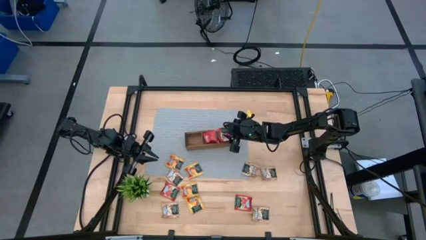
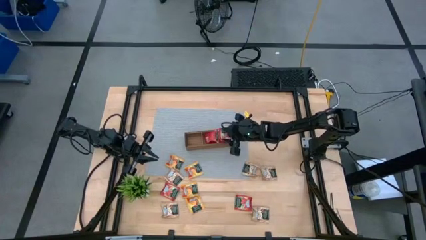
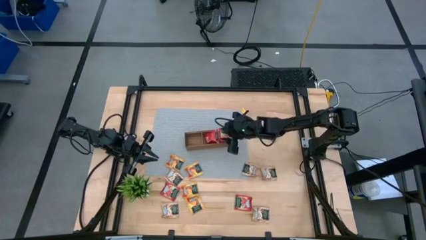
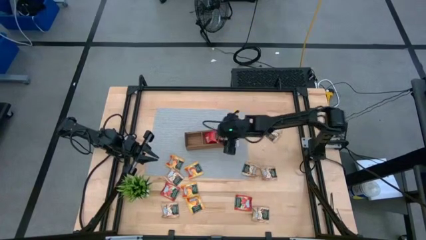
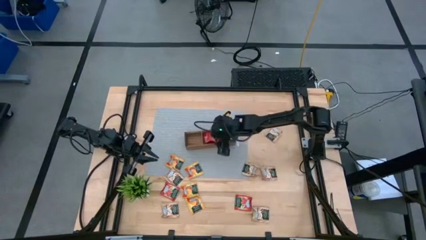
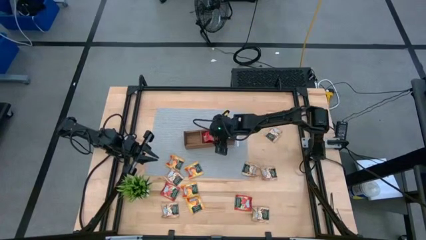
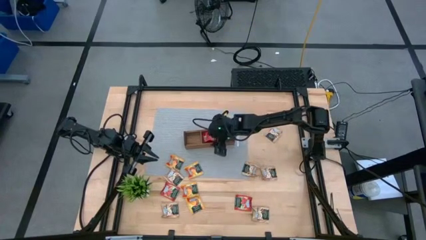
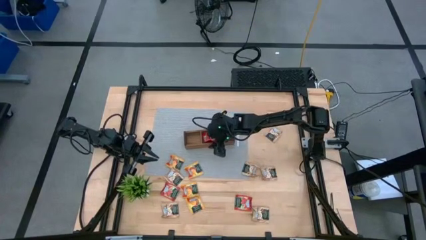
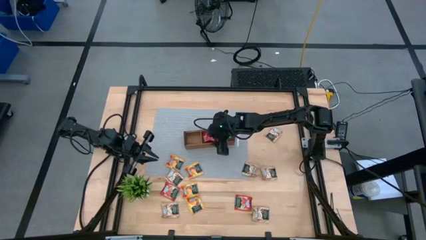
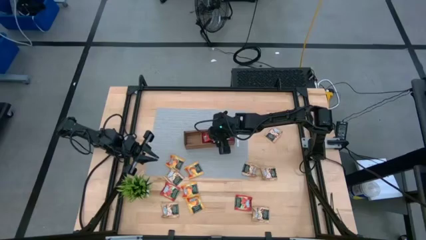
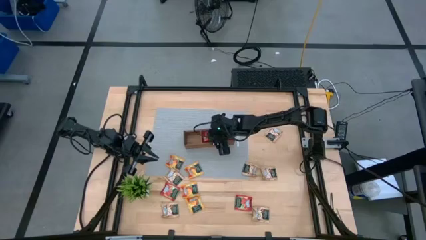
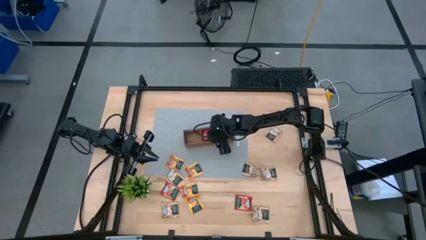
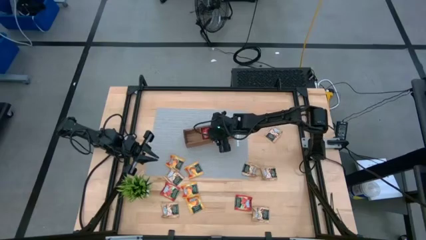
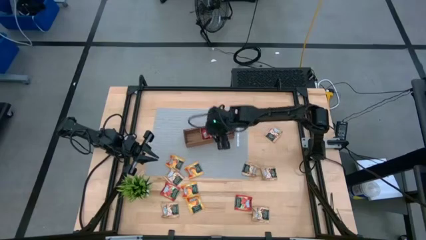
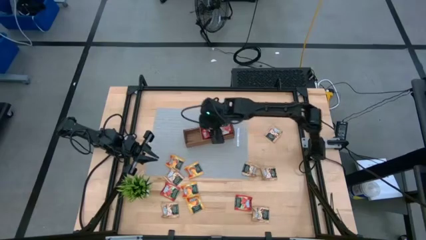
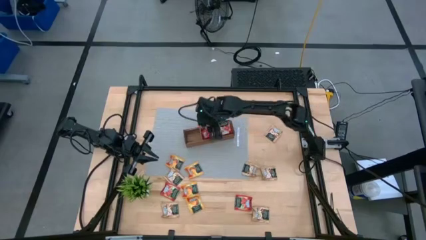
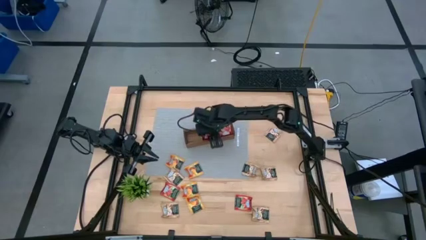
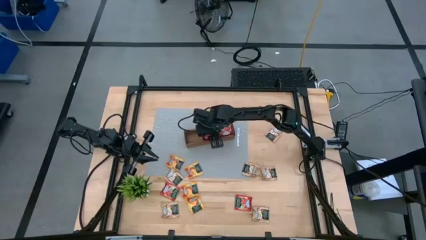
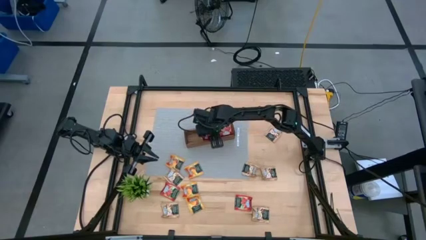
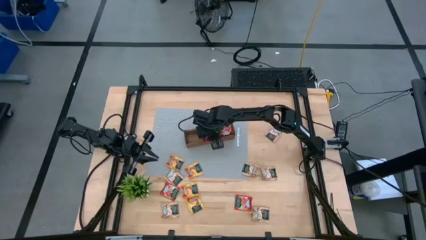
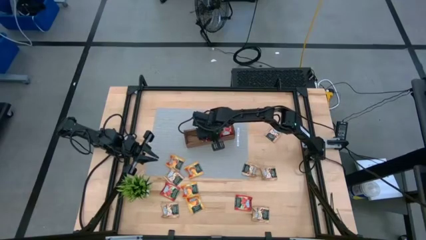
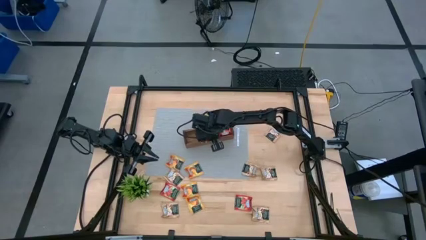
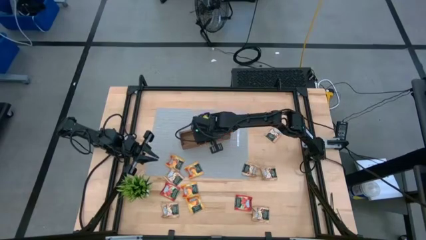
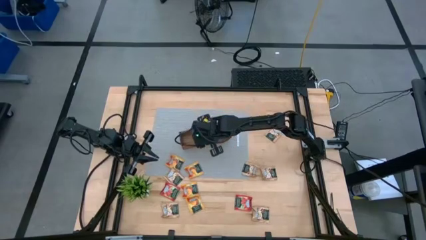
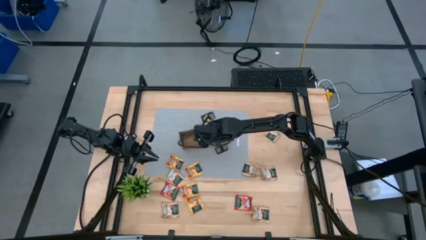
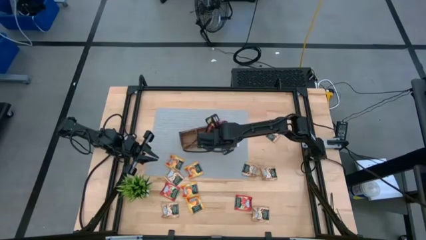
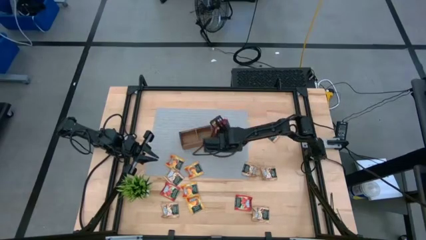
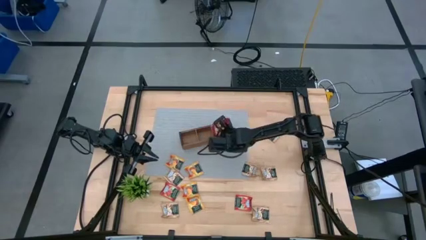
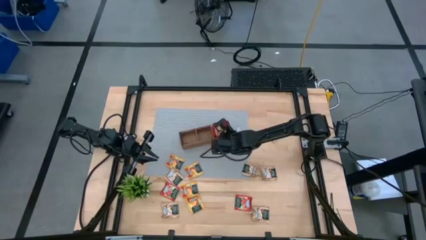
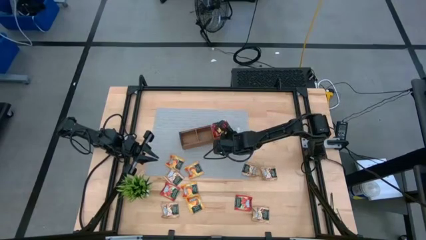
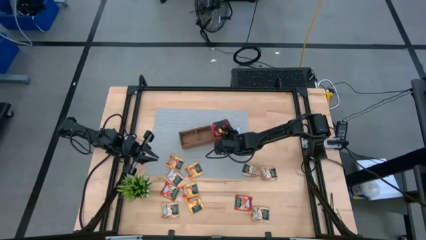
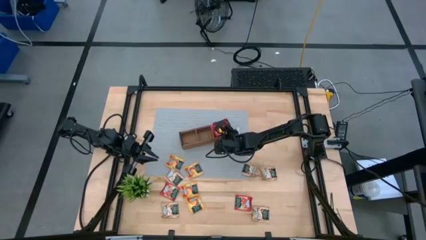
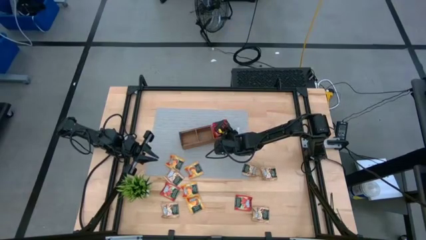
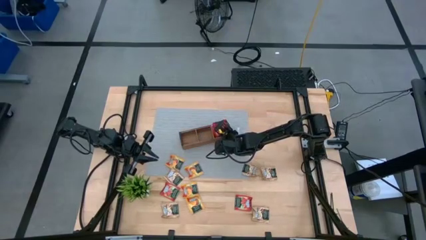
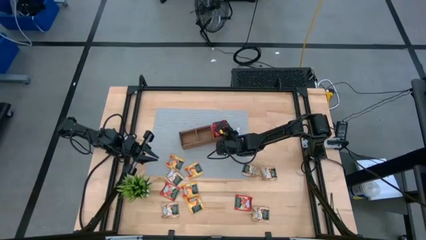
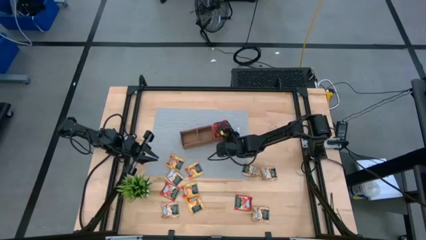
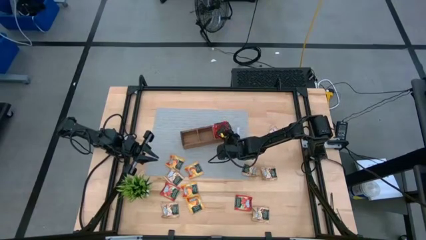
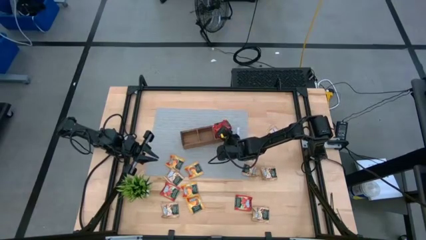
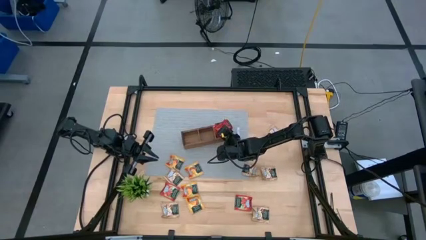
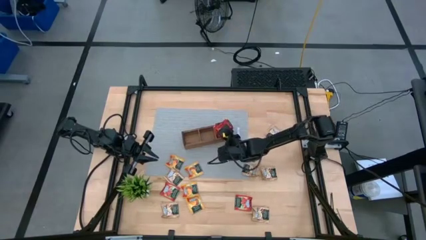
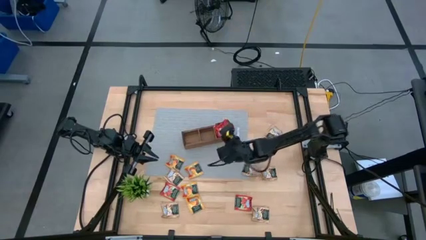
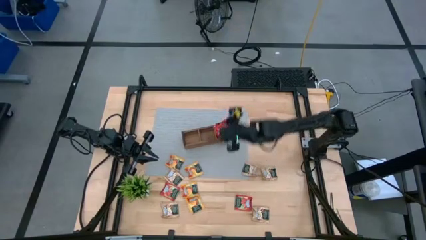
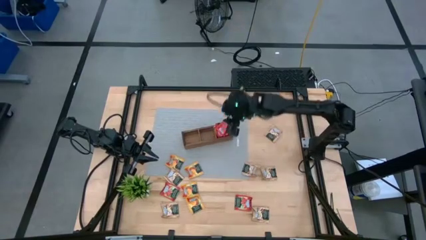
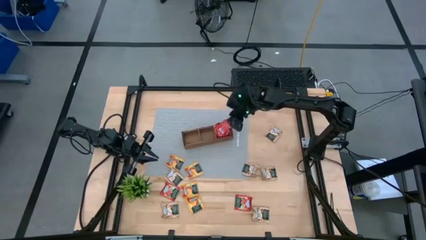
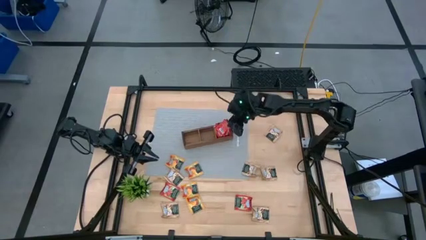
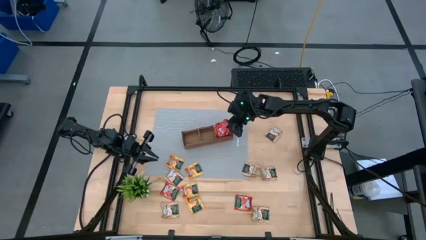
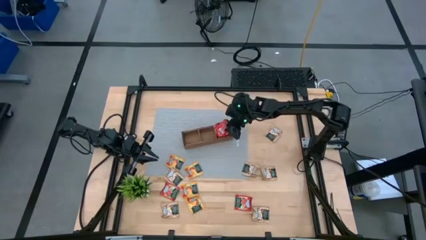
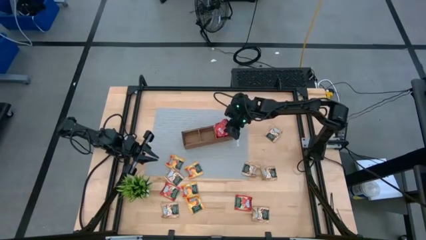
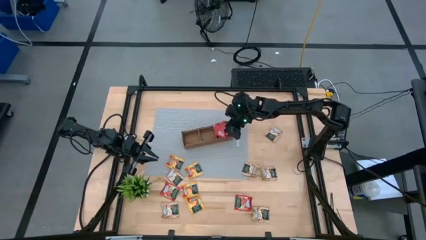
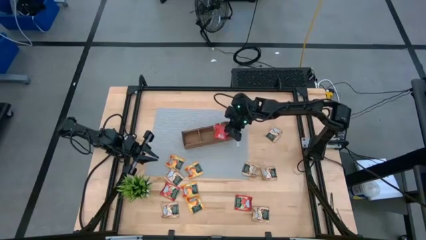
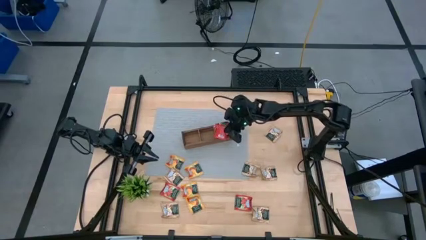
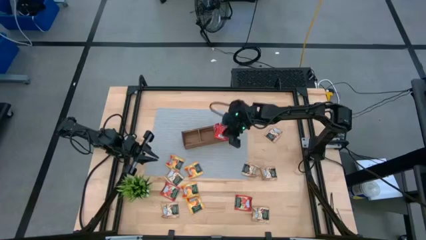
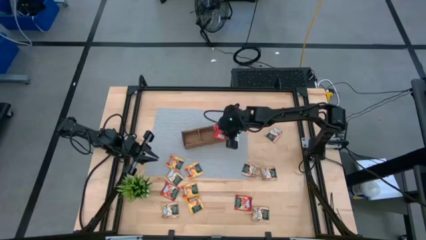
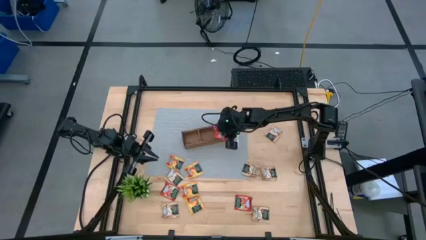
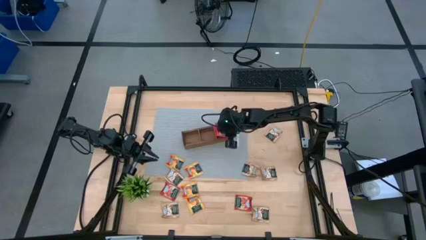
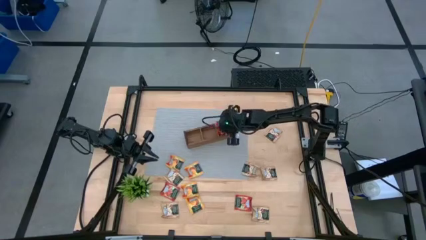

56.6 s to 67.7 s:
Task: Pick & Place Tea
Put the red tea bag into the wooden organizer

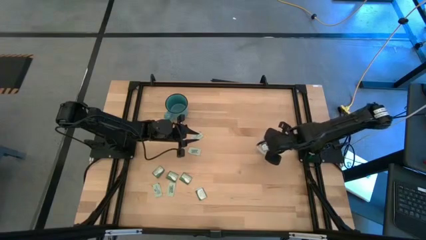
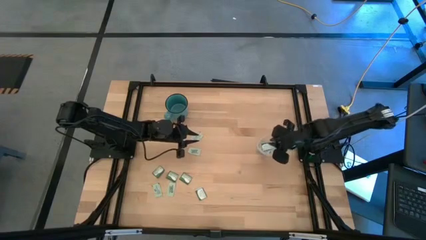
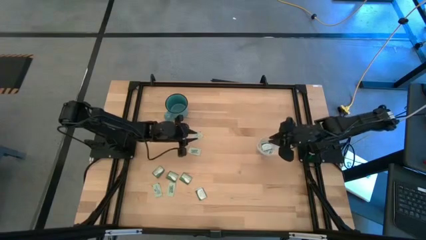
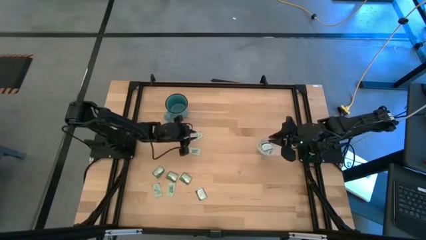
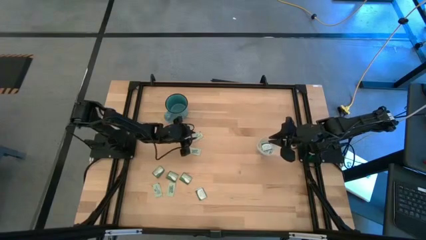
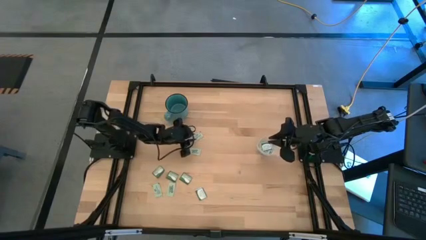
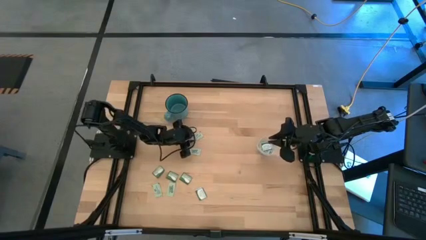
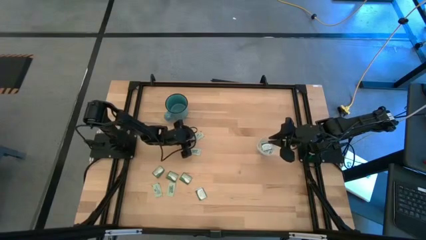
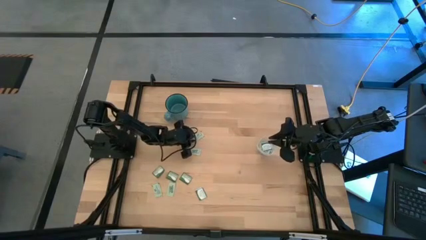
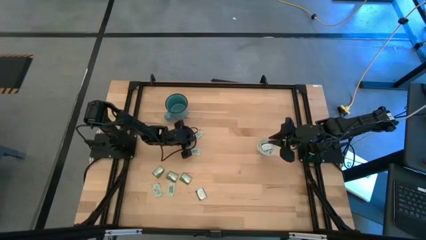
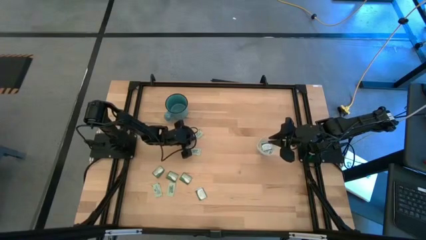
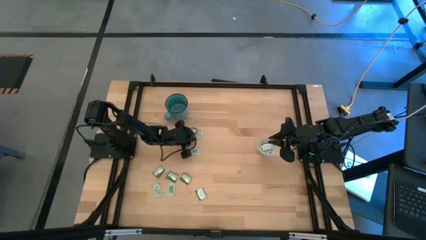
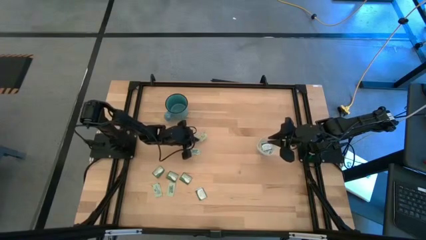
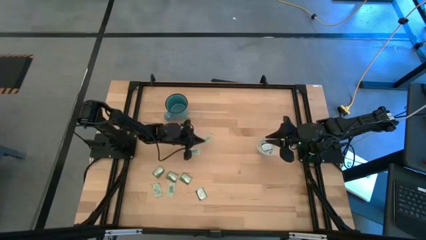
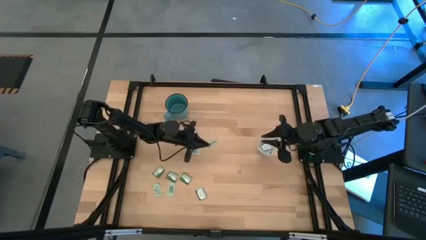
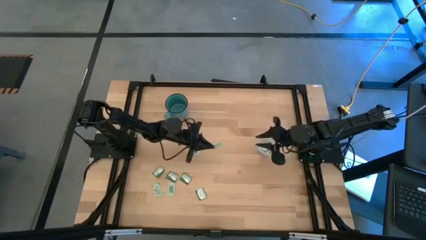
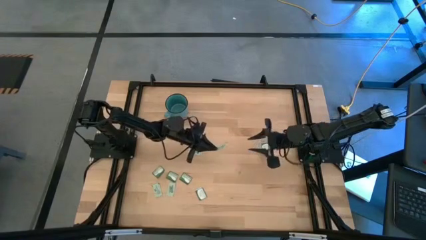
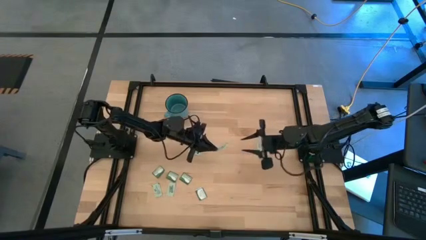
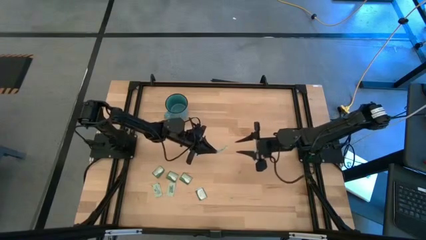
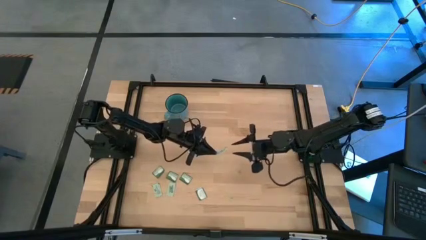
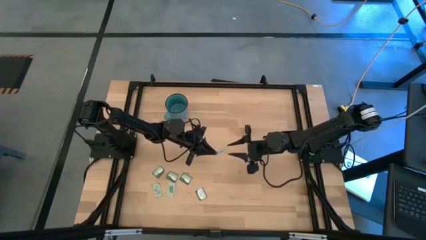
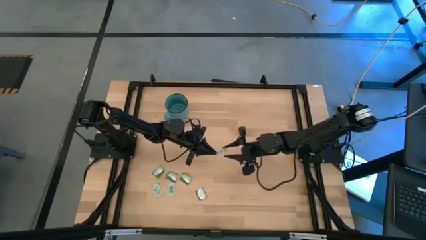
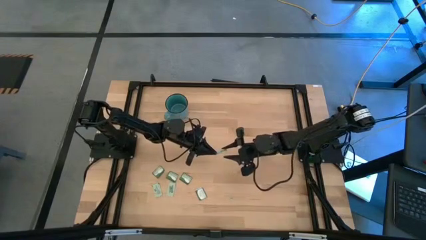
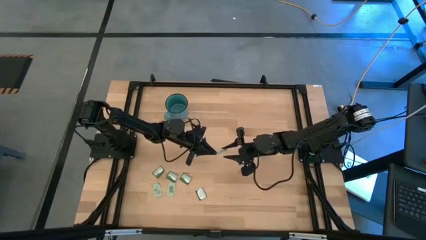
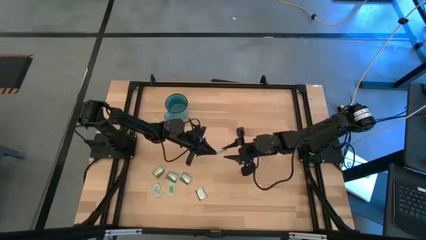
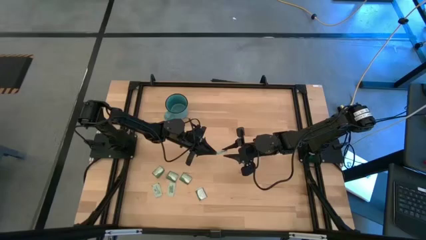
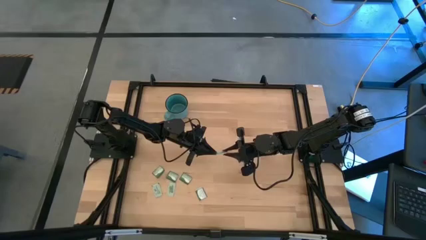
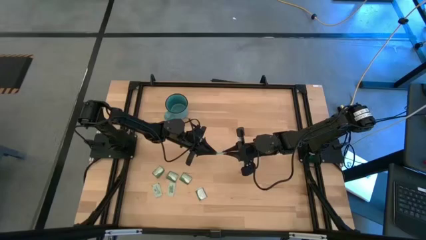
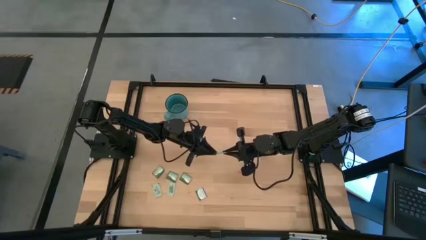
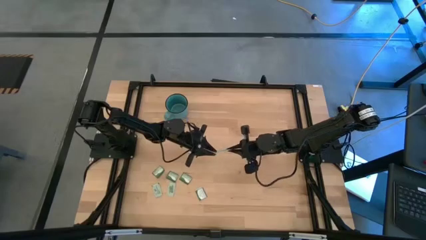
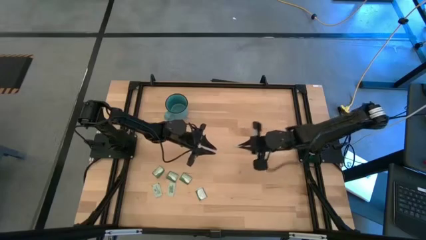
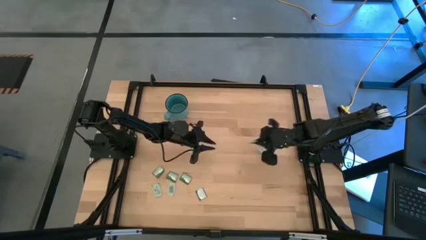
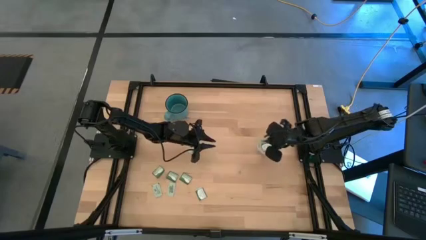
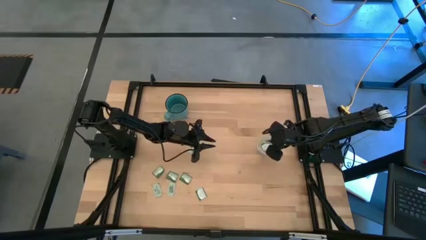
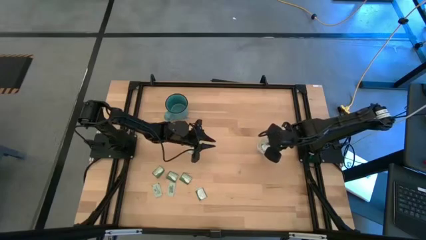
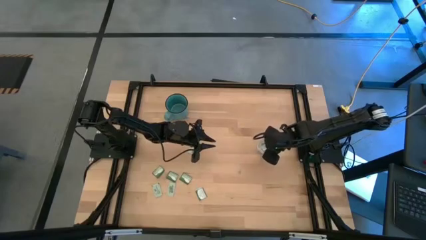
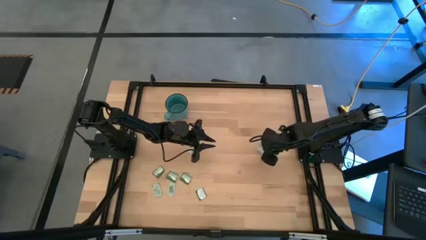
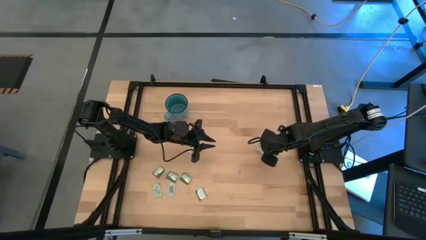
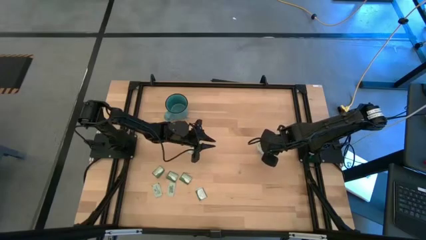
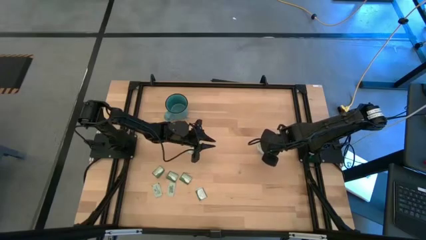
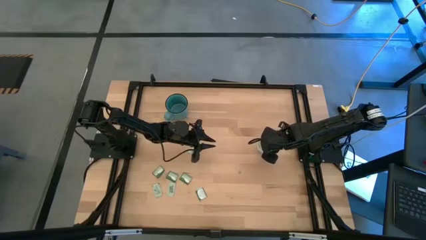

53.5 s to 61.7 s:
Task: Pick and place Stevia / Truvia into bins
Put the stevia packet into the transparent bin
